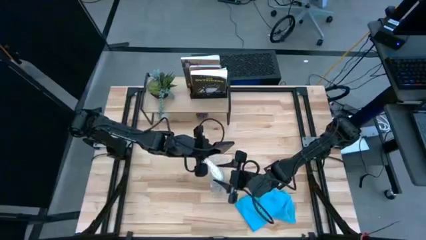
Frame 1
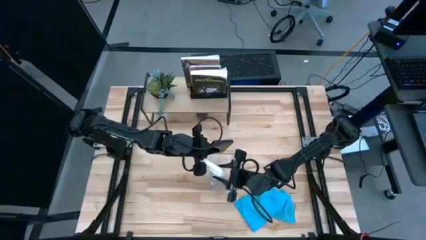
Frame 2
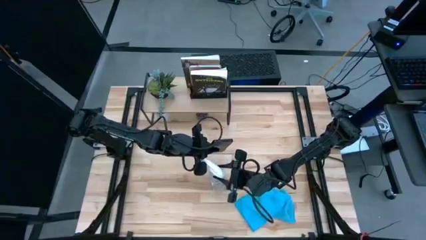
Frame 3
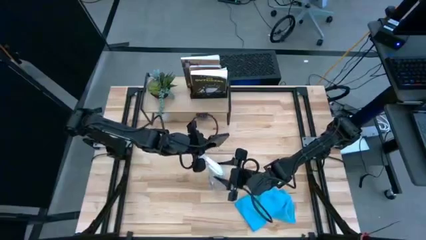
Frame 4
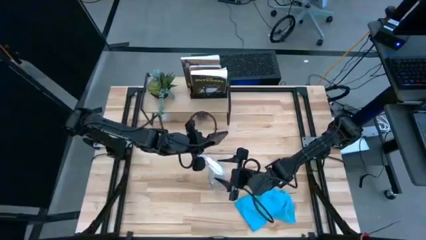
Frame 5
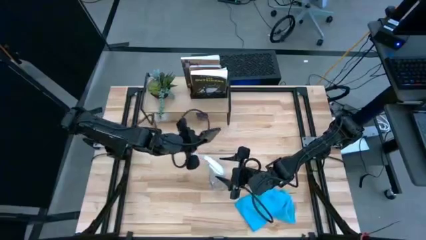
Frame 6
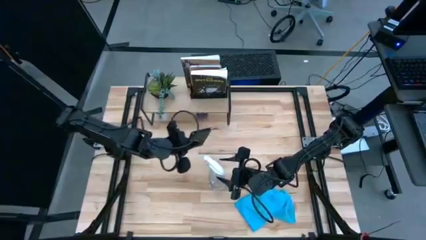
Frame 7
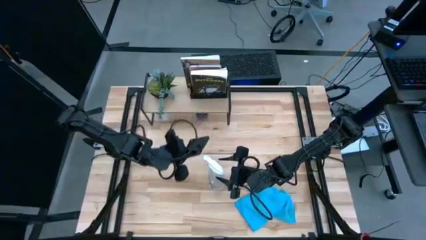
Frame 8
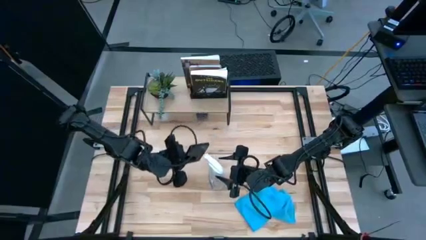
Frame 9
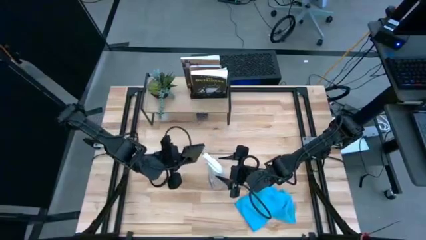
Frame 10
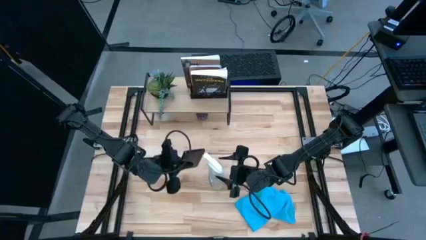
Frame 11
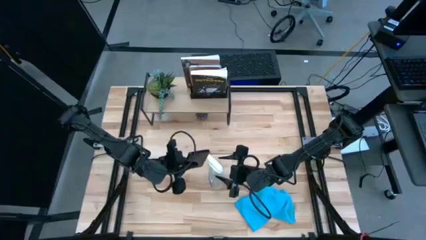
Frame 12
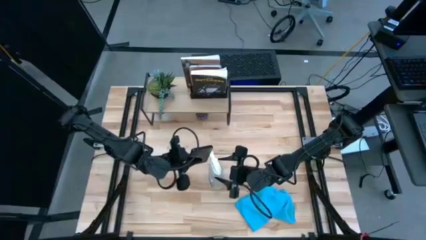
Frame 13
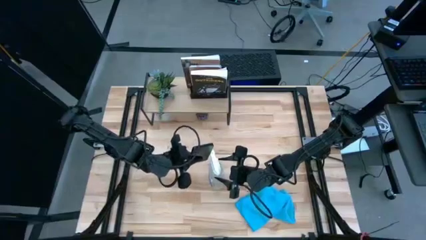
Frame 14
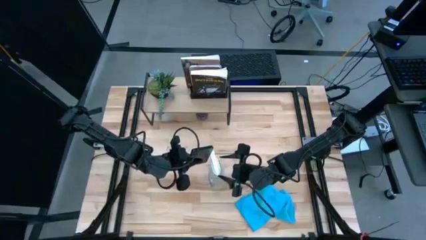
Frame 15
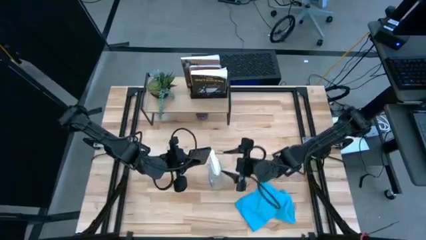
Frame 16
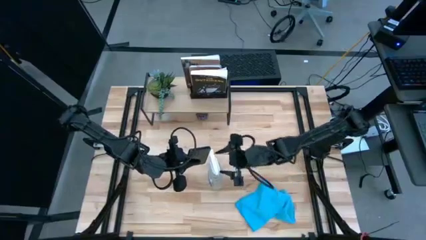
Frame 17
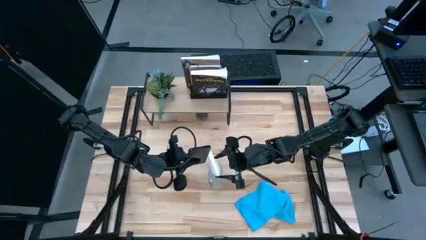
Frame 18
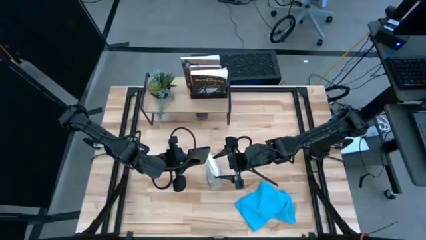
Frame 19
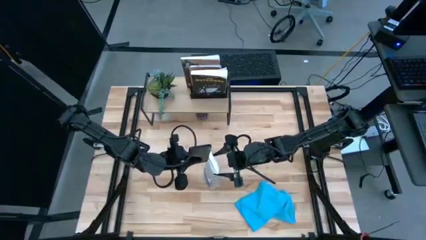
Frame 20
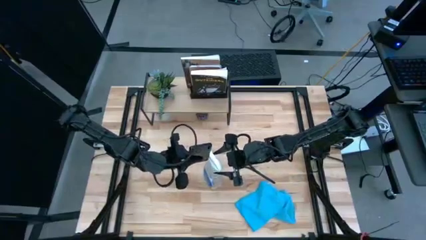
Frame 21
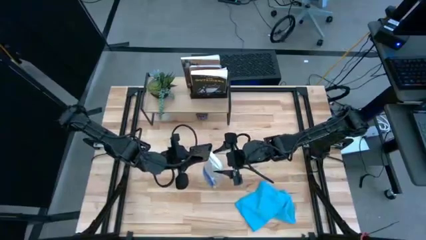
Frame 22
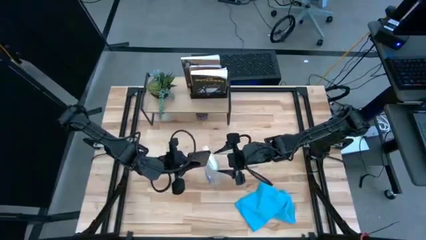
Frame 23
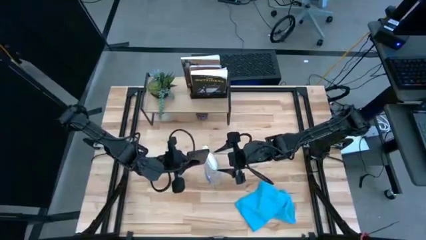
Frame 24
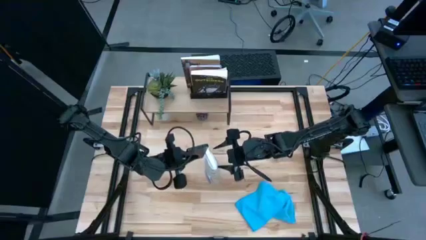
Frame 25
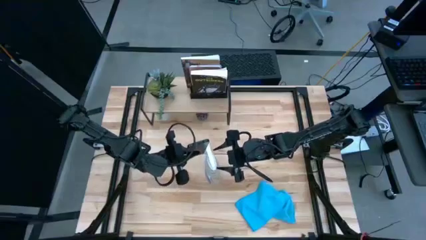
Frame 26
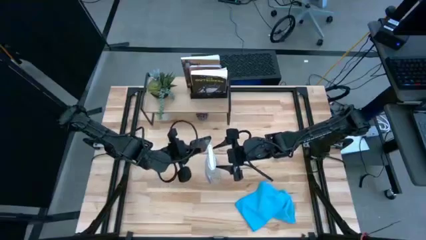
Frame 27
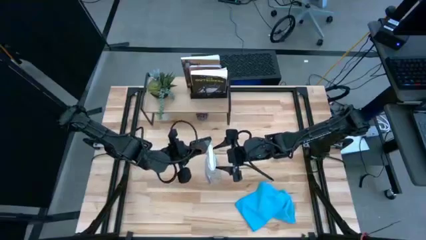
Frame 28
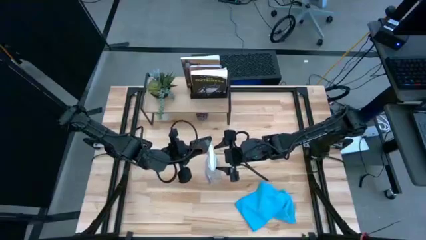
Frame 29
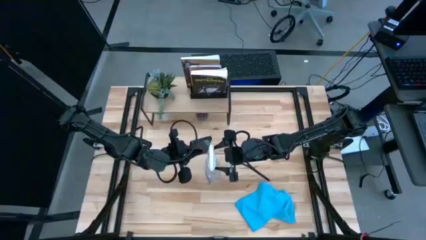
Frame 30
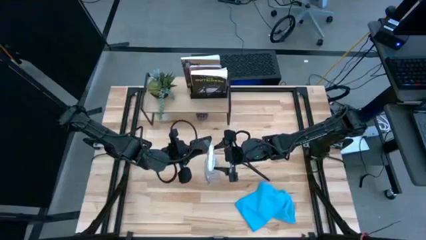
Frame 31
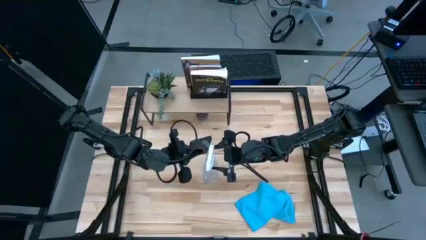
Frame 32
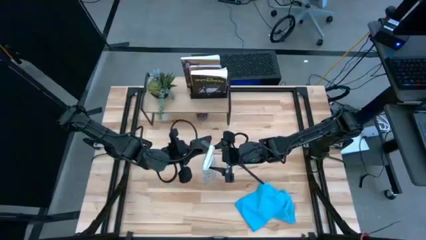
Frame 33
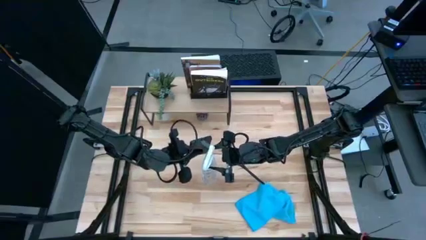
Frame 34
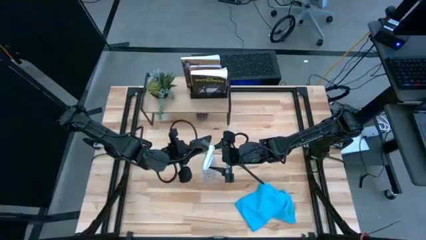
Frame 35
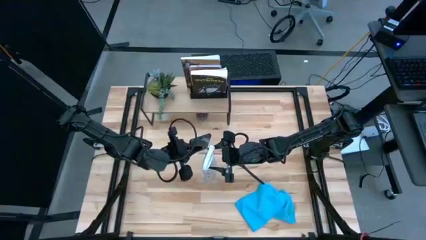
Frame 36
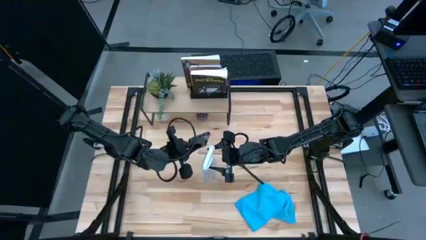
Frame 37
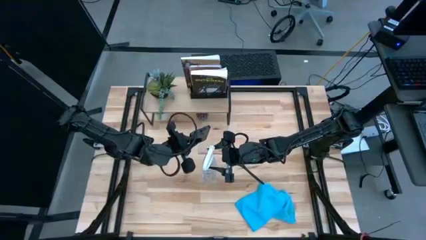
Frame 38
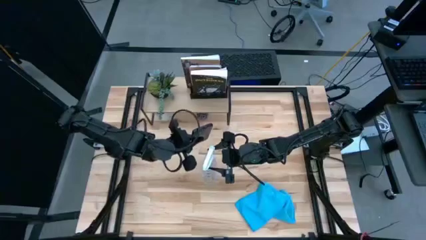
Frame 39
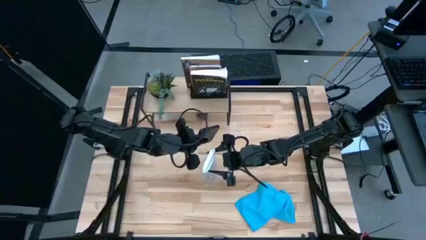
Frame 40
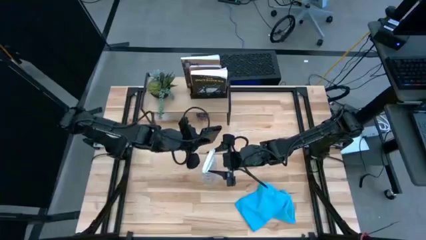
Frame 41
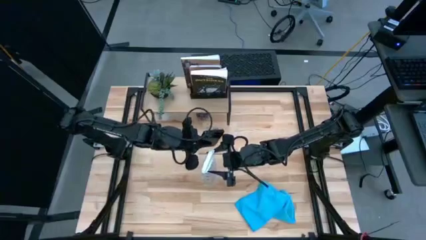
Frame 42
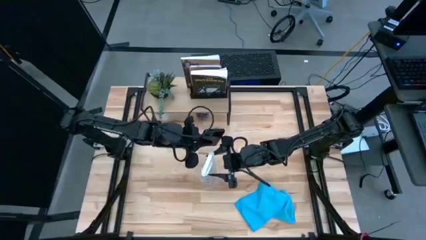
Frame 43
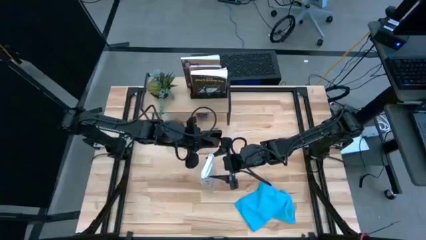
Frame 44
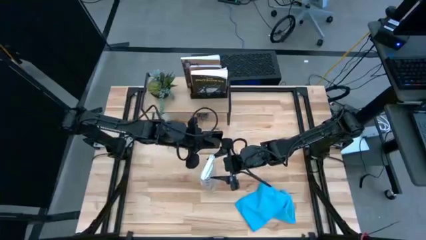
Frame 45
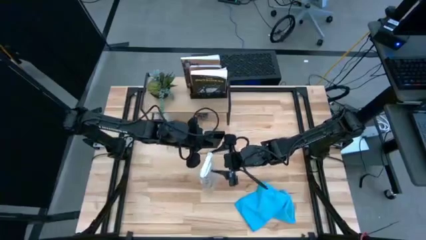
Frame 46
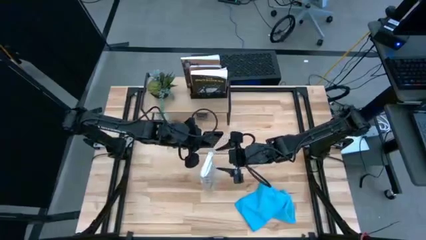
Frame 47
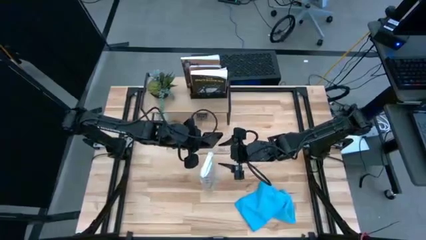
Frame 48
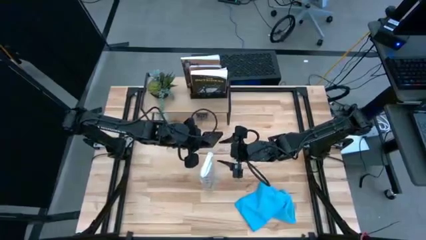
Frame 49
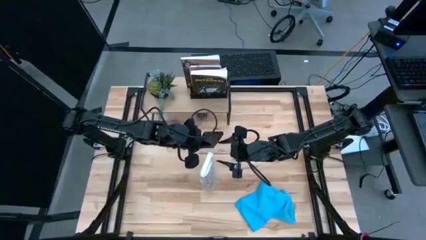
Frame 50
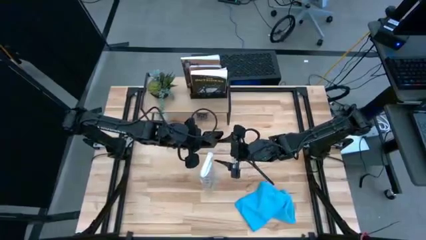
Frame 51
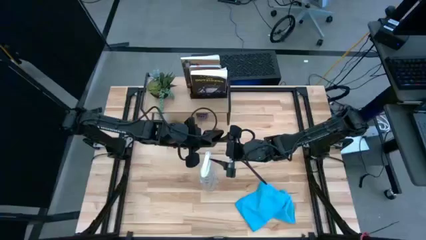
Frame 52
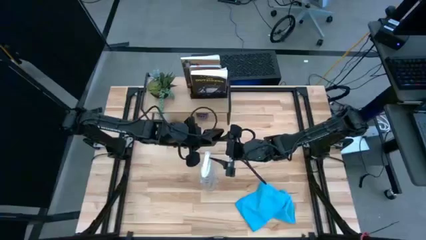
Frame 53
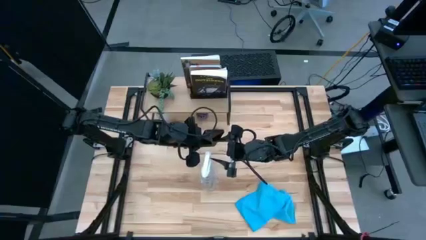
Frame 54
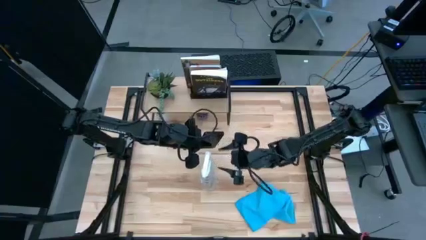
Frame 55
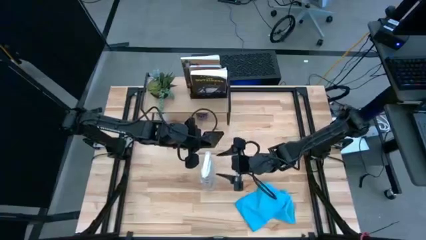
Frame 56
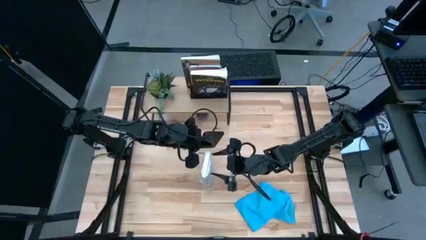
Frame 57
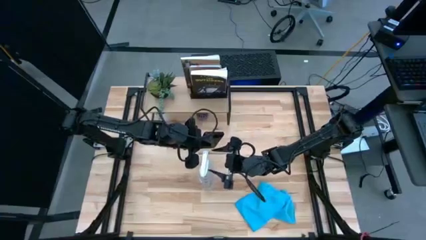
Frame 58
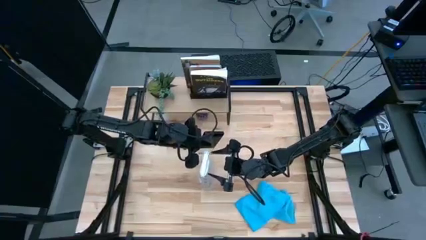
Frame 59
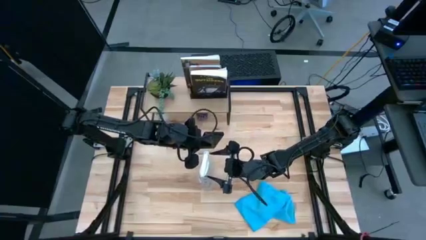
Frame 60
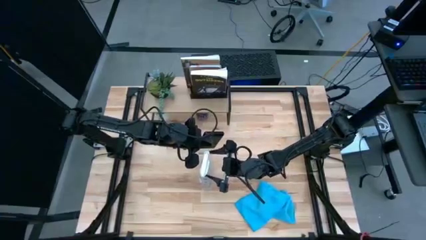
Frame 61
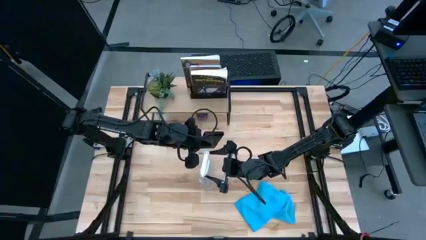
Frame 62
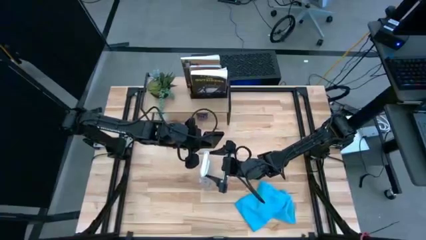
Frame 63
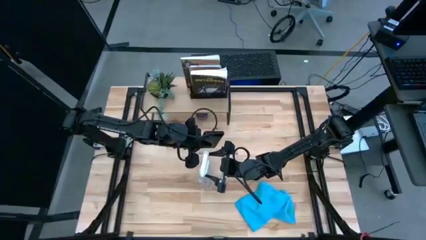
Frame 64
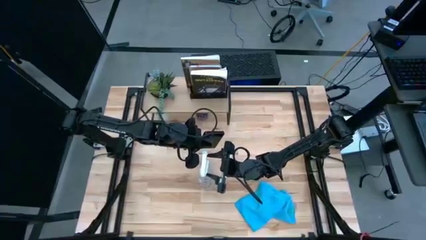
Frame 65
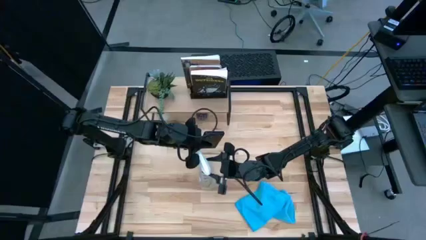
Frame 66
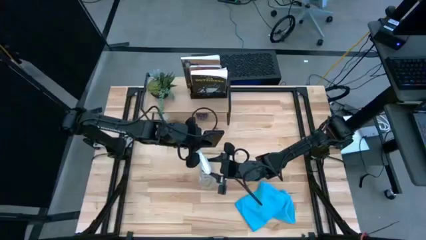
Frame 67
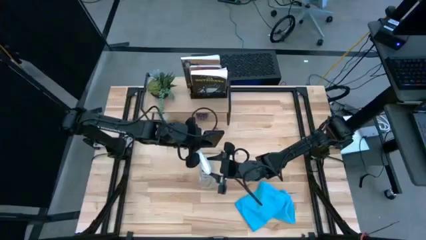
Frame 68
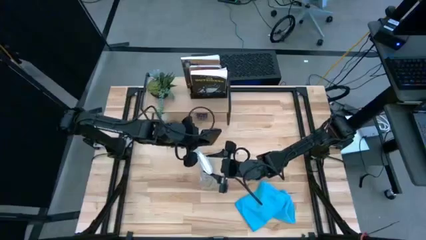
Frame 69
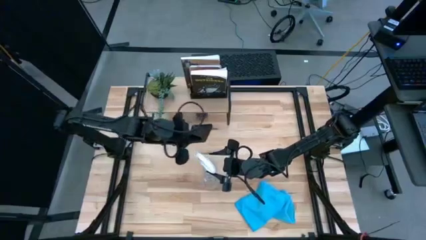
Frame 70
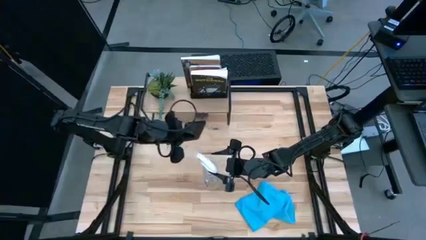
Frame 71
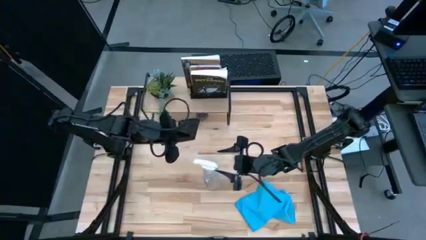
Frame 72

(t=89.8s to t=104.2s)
Task: Apply microfiber cloth
Spray the back of the black cellphone using the transparent spray bottle

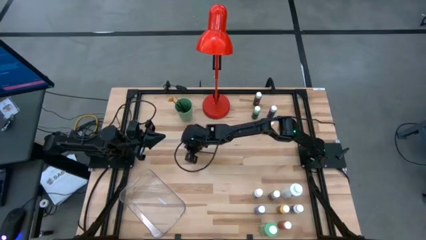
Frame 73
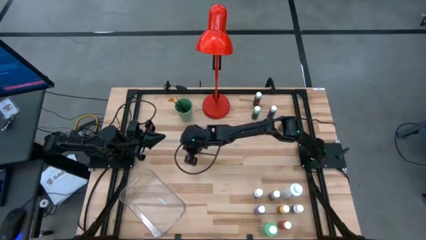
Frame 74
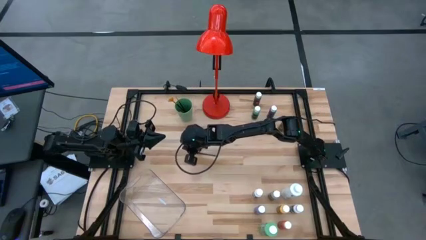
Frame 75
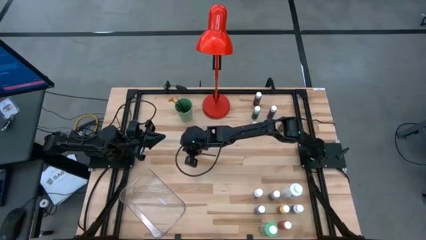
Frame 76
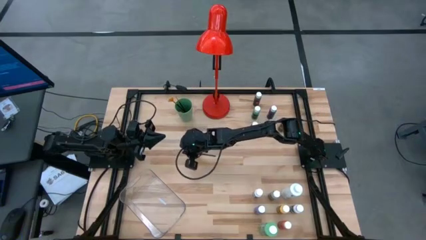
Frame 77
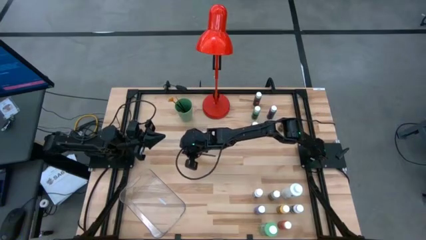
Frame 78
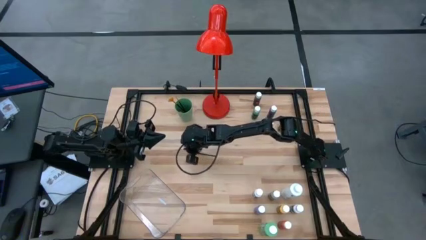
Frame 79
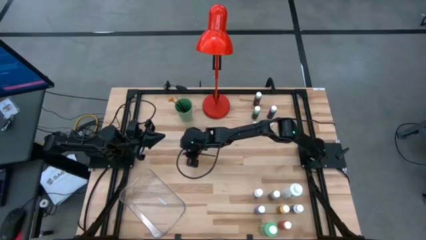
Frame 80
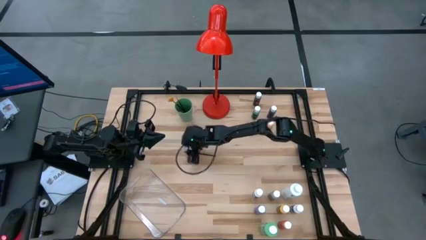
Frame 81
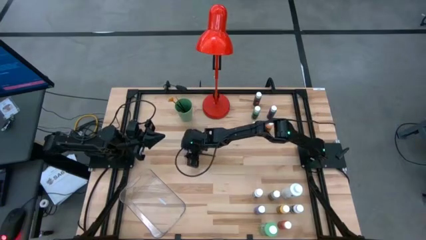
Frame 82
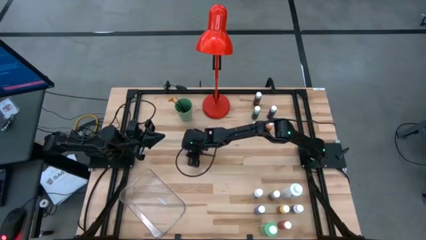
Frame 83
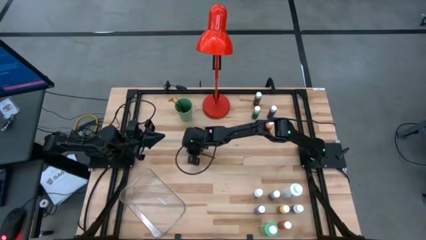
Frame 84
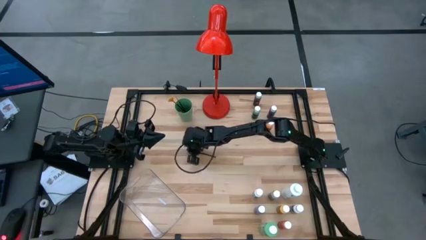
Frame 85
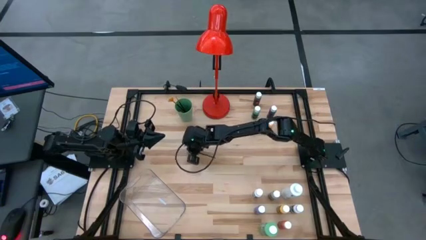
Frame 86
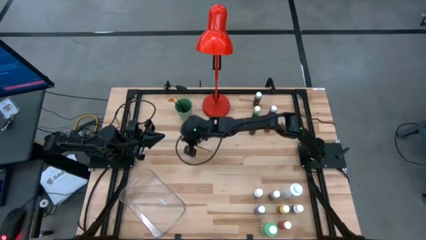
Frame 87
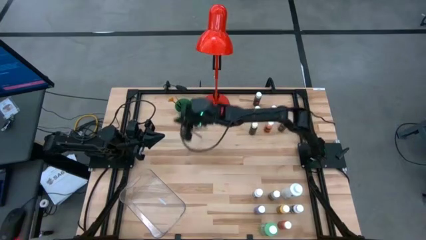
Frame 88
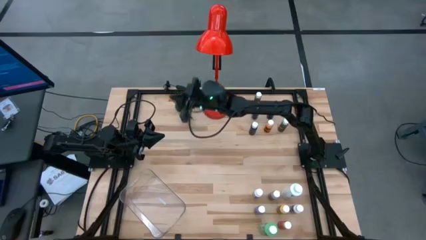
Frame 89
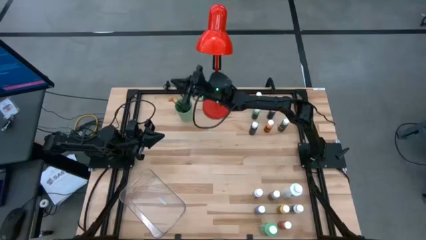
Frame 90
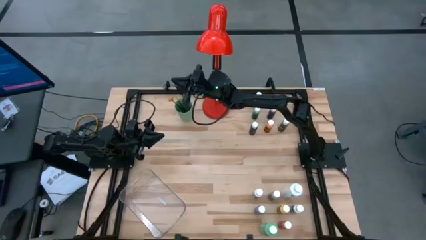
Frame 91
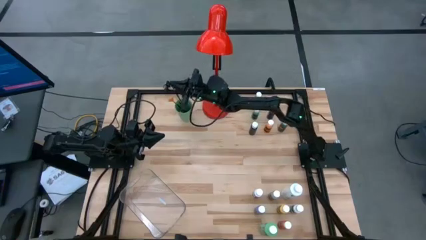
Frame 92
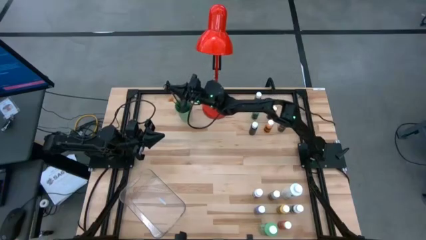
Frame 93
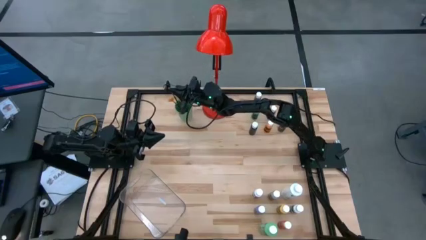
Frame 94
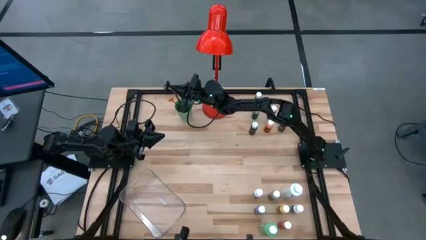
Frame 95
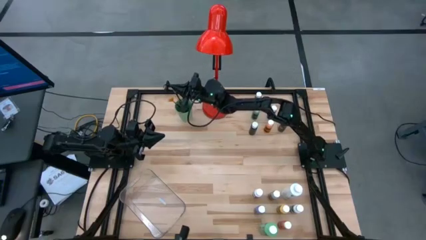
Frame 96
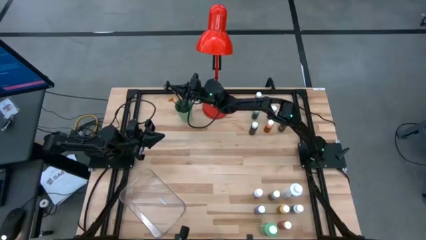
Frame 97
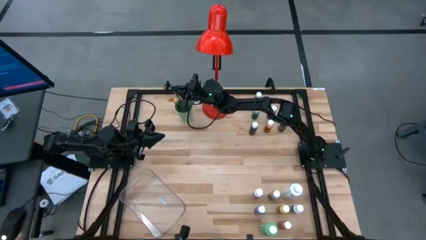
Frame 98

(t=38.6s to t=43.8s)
Task: Pick & Place Paint Supplies
Put the silver paint brush into the green cup
